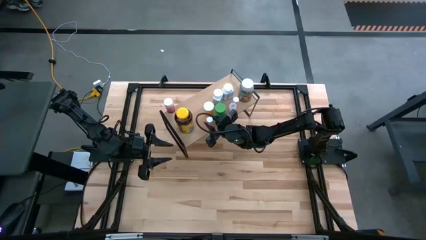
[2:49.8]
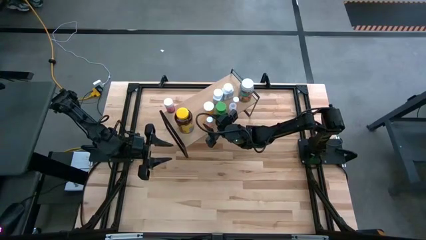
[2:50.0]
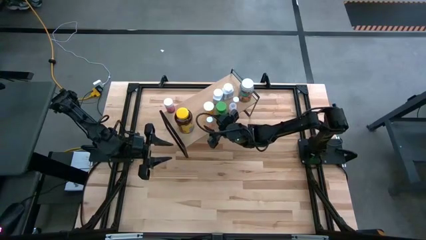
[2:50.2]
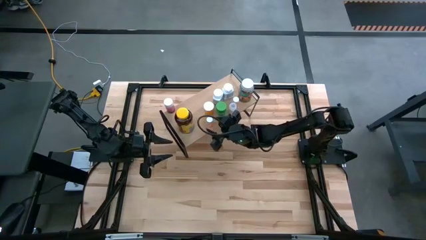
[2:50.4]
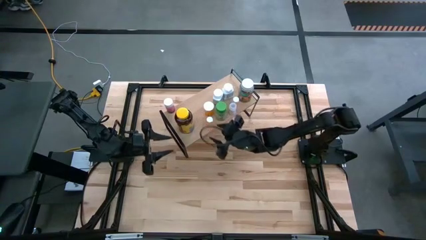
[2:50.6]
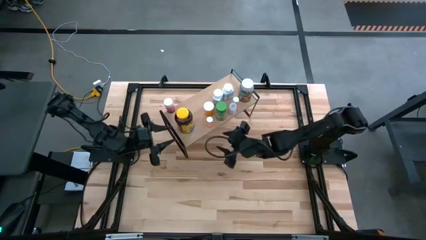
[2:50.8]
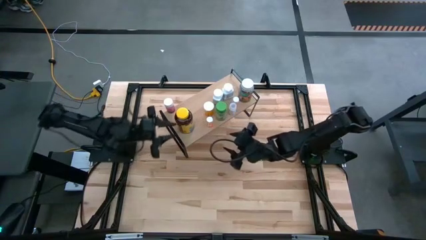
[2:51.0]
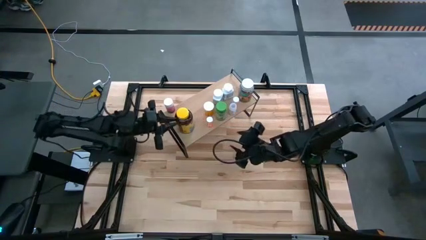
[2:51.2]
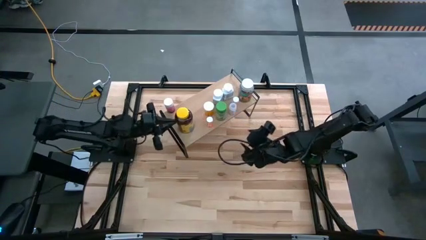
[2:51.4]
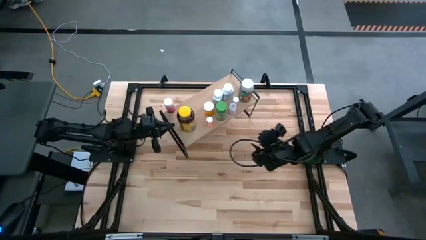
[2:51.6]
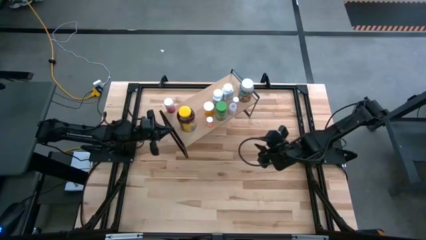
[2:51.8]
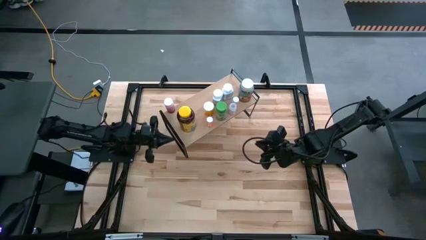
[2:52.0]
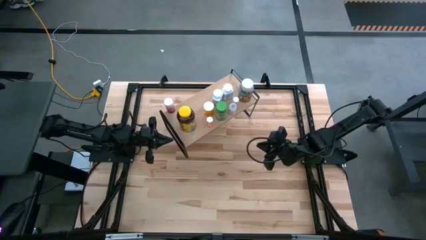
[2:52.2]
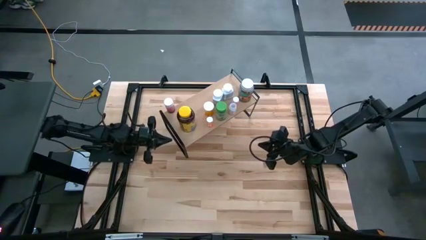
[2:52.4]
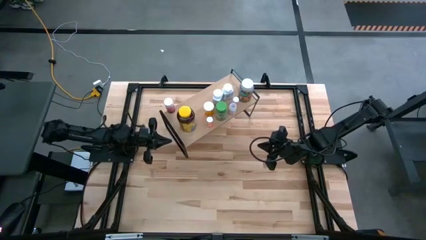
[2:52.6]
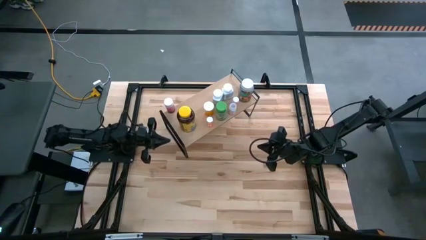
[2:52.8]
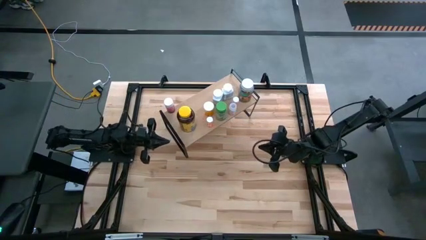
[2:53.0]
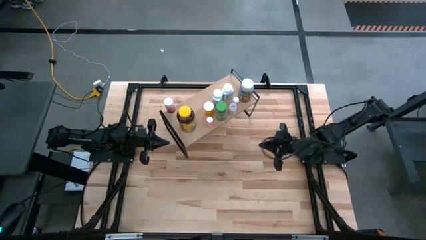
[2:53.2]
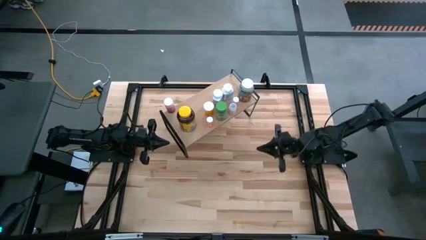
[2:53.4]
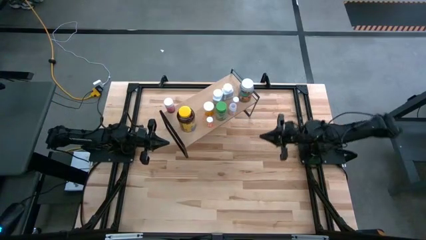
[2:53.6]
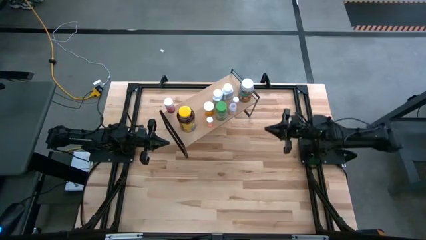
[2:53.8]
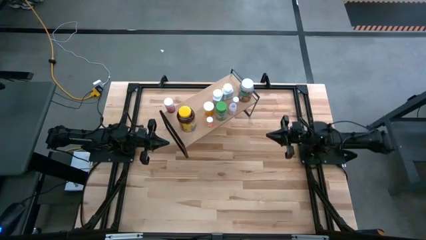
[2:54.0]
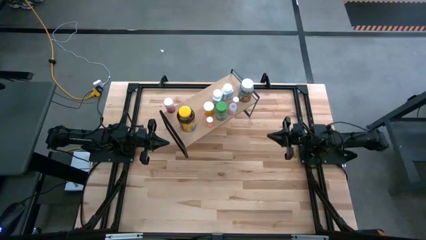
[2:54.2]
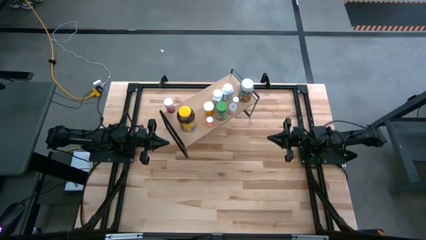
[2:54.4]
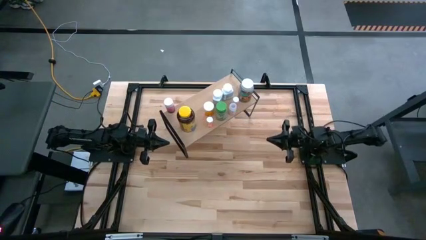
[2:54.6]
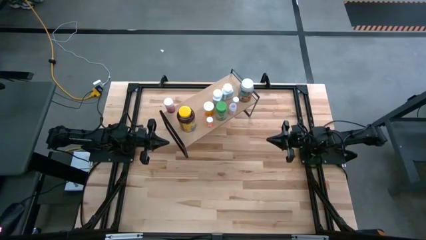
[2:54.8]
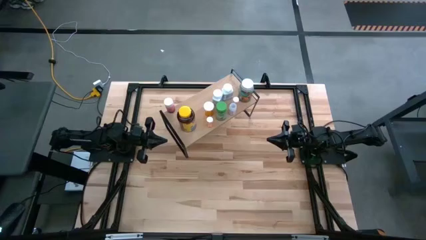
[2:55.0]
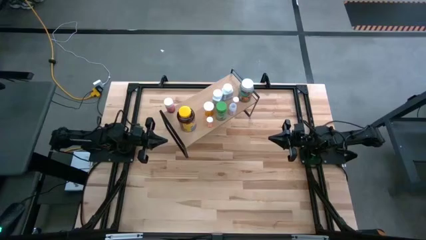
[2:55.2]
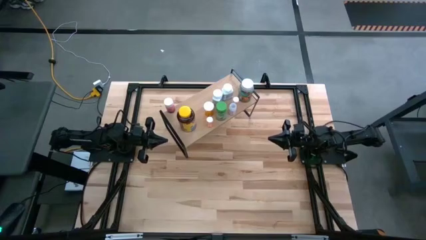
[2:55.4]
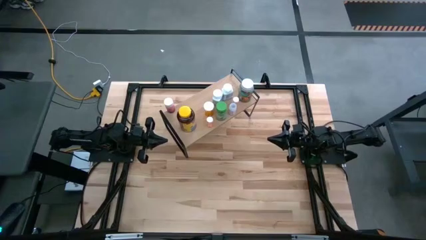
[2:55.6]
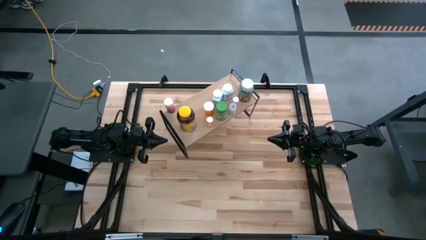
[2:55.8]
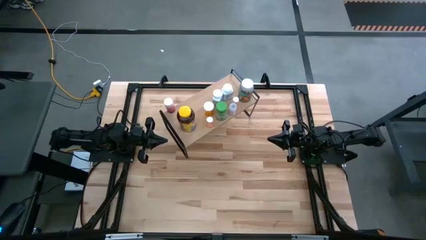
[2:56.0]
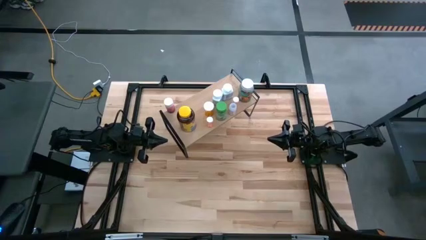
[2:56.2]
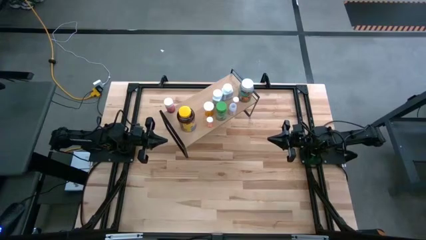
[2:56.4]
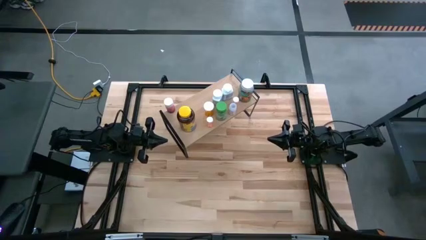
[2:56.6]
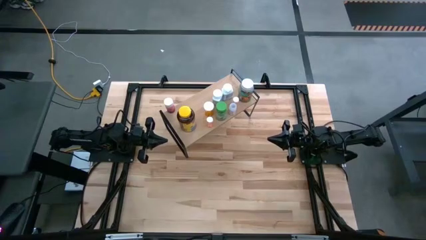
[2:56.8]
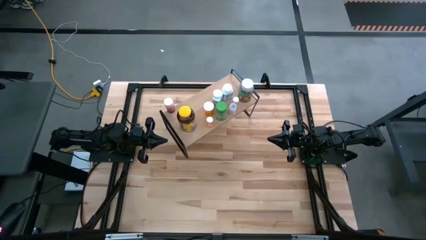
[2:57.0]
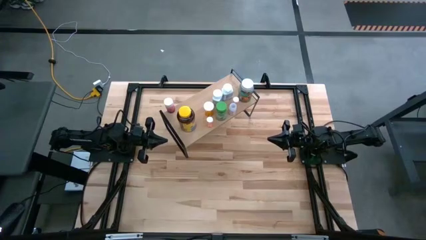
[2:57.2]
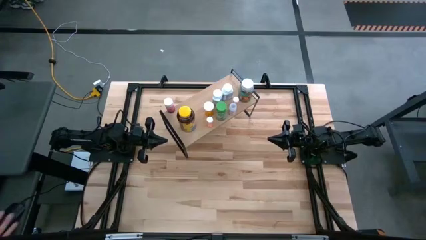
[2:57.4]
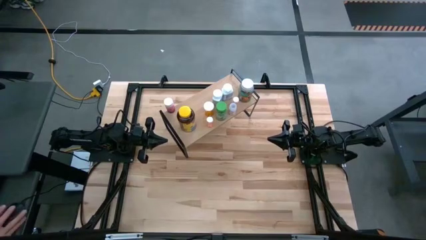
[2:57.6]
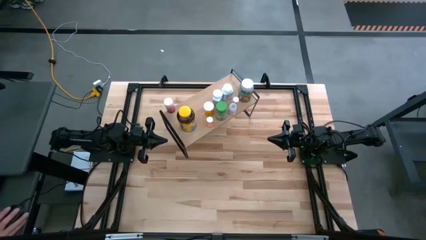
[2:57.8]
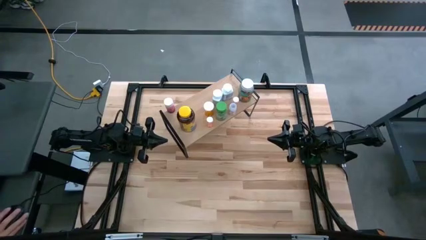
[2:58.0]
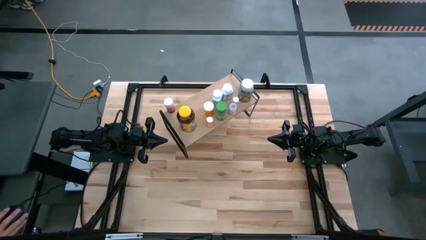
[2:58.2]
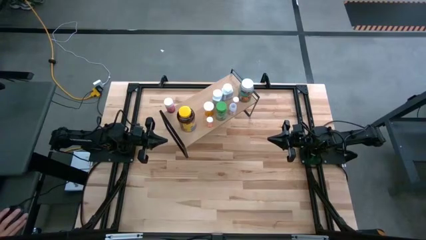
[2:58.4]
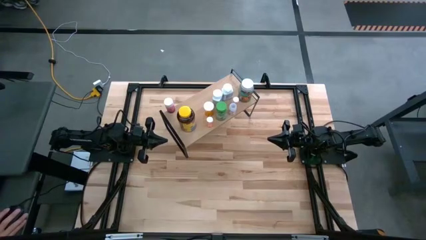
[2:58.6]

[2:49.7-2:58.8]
Task: Pick and place medicine bottles onto shelf by color
Return to Home Position

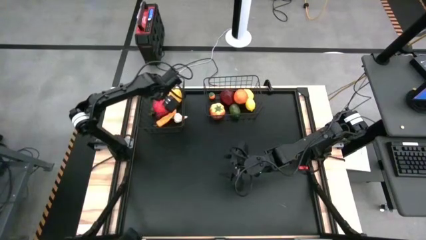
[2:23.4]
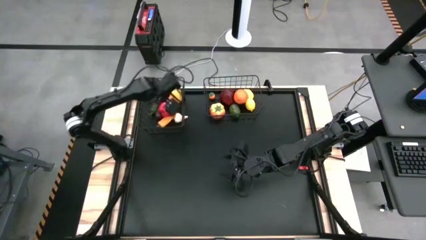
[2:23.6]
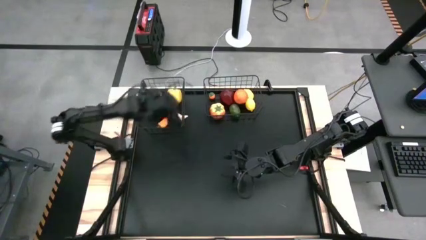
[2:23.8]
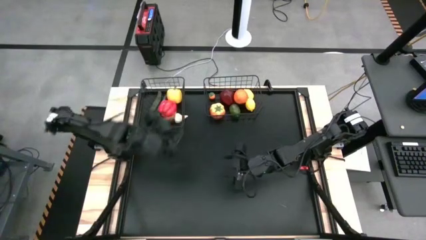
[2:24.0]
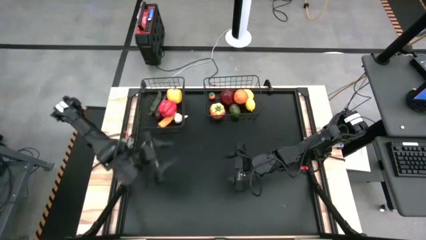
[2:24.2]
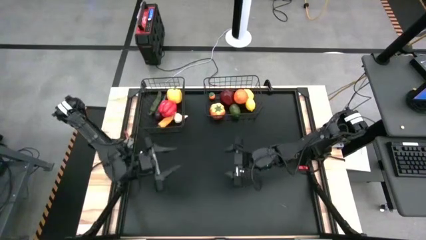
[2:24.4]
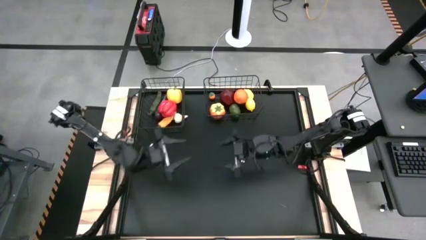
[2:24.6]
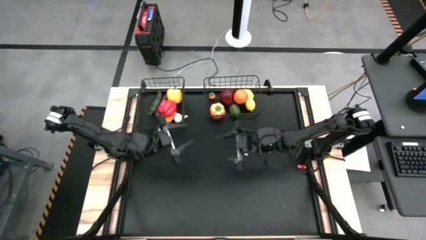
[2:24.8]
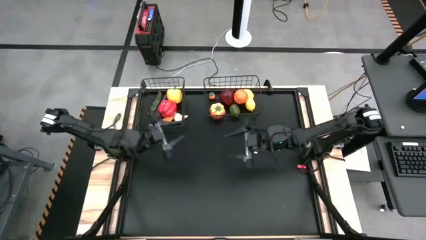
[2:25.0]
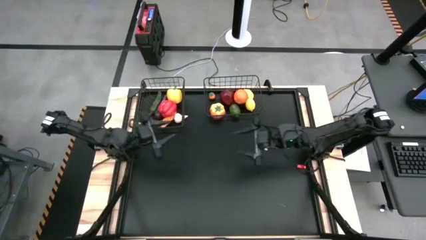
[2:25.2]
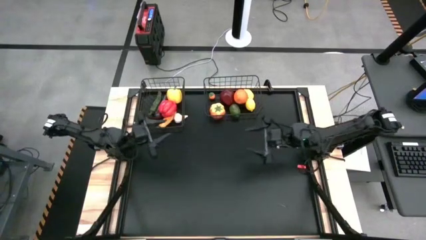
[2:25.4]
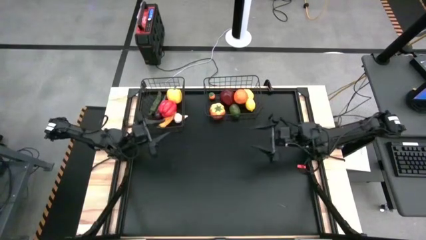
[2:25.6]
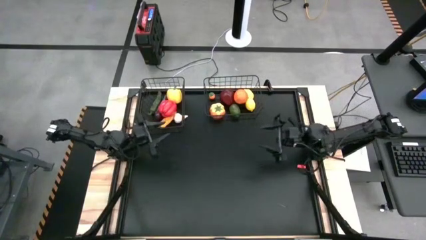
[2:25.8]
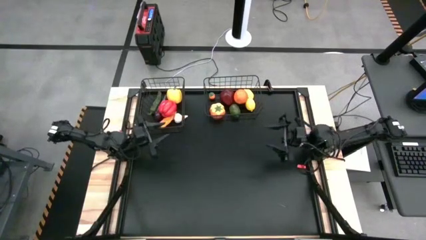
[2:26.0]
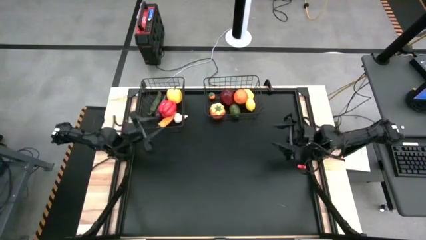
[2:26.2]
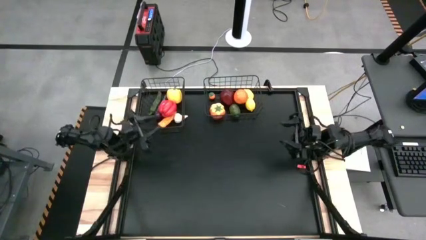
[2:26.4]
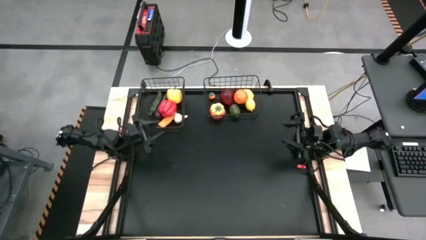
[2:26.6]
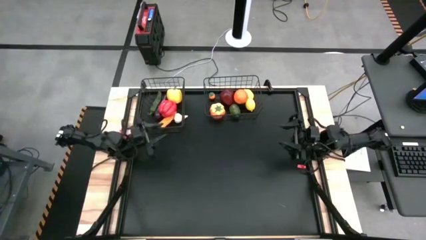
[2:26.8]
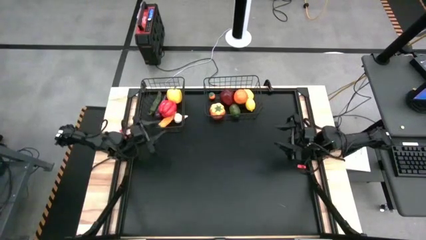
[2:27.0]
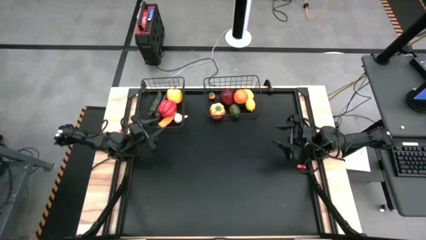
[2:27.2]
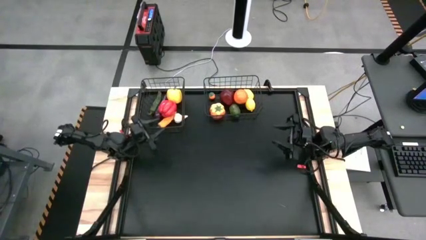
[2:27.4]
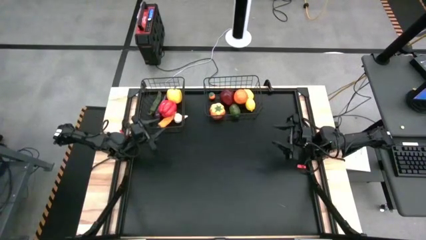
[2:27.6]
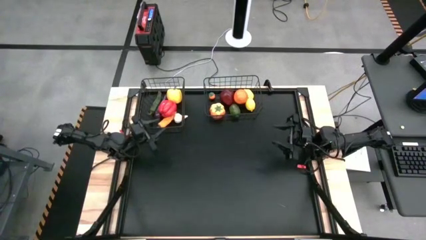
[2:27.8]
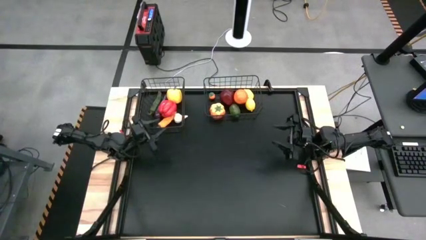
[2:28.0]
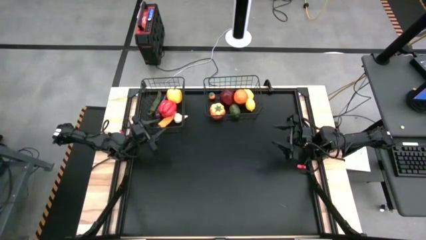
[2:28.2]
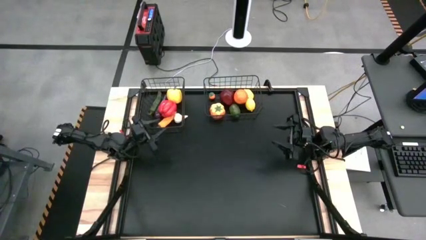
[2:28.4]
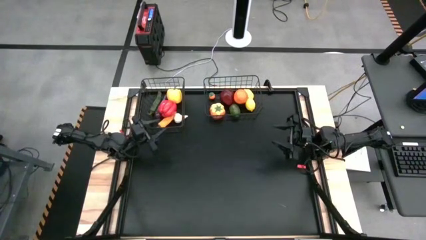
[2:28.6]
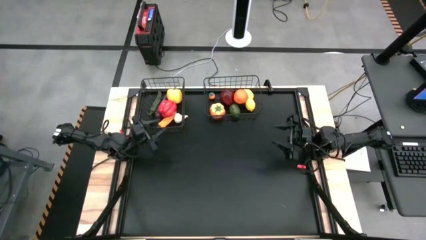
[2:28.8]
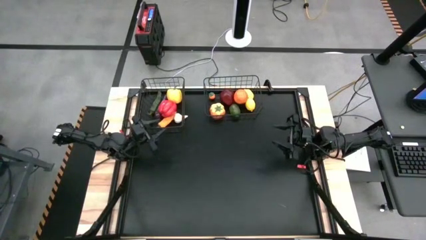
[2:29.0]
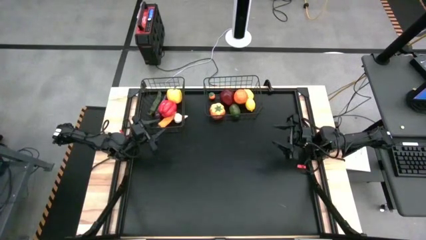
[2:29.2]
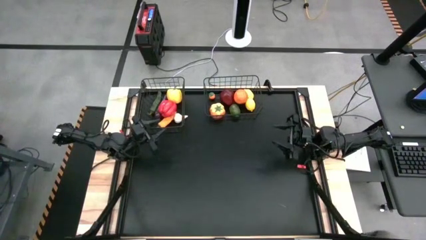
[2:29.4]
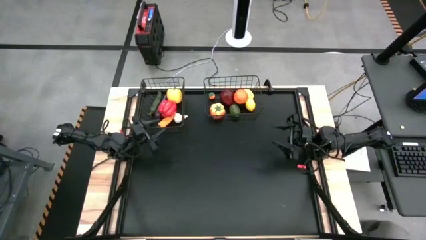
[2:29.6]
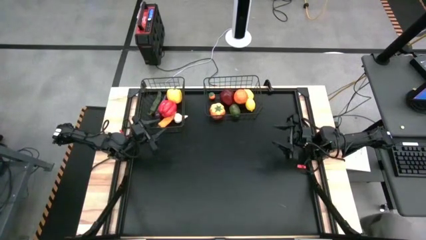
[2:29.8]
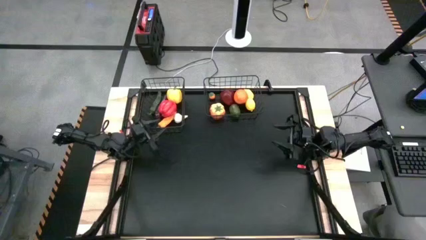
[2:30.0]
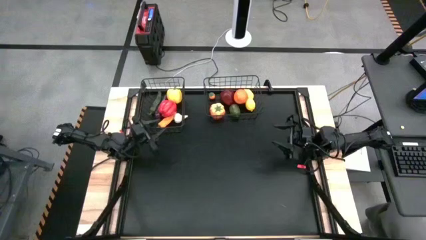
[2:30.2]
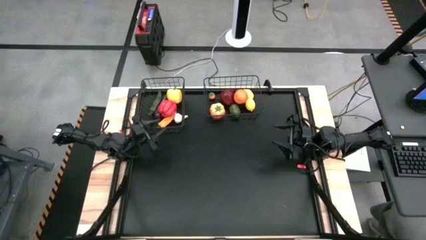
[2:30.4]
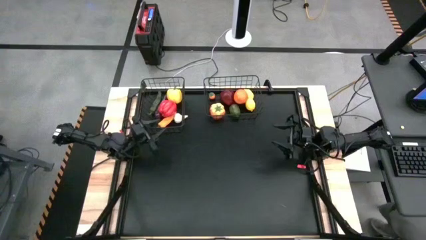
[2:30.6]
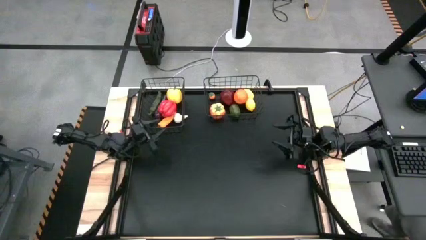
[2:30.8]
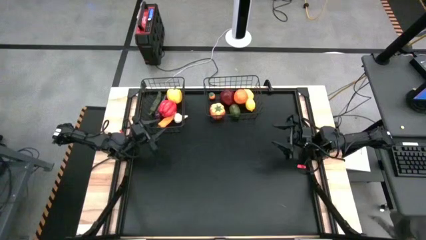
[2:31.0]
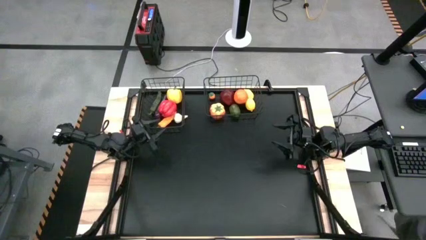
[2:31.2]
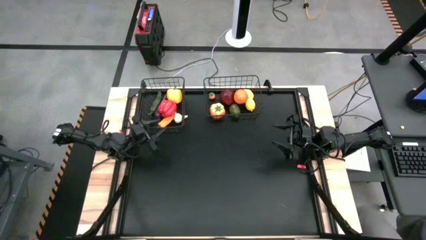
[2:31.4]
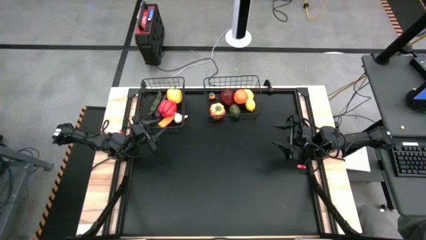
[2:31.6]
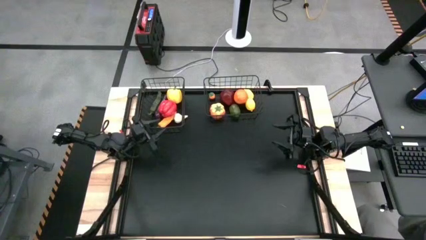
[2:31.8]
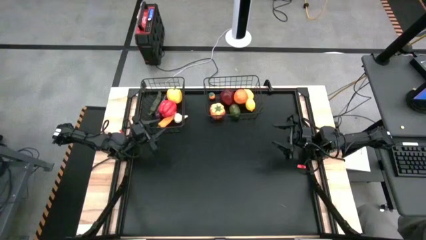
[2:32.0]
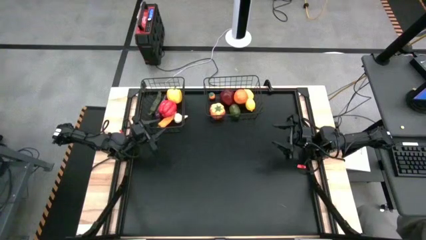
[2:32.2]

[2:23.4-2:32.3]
Task: Sort produce into baskets
Return to Home Position
